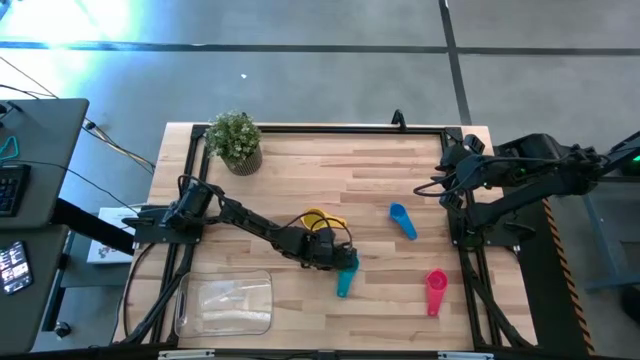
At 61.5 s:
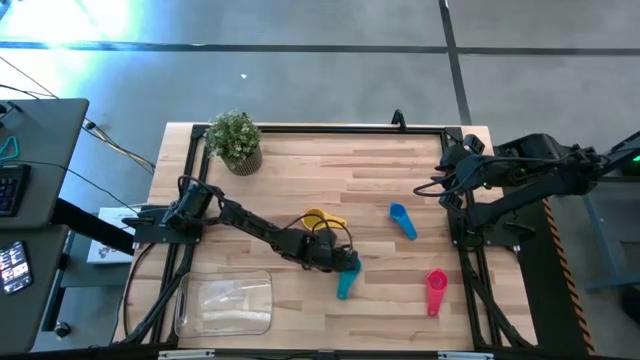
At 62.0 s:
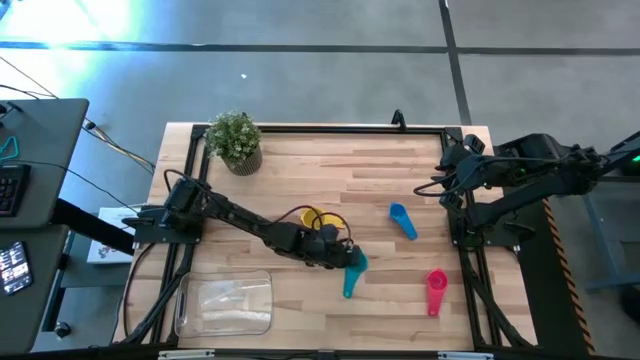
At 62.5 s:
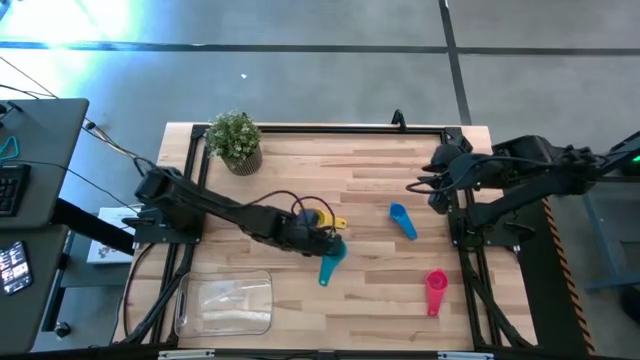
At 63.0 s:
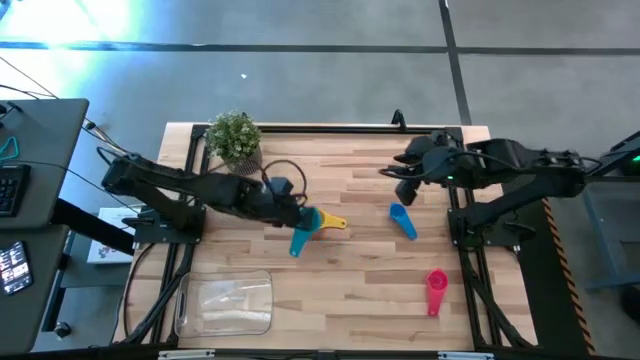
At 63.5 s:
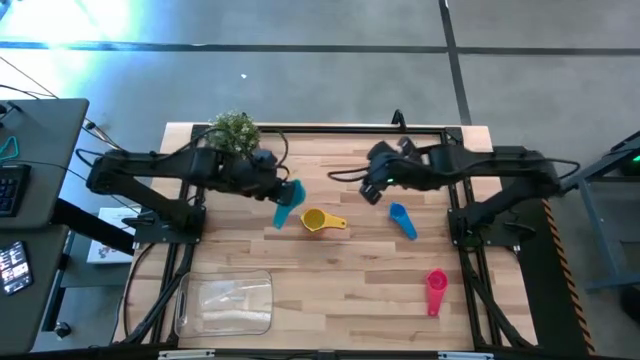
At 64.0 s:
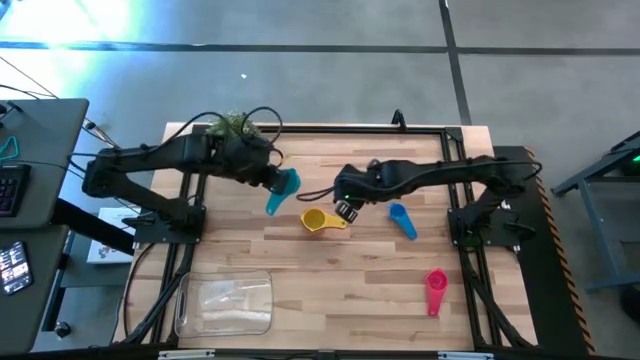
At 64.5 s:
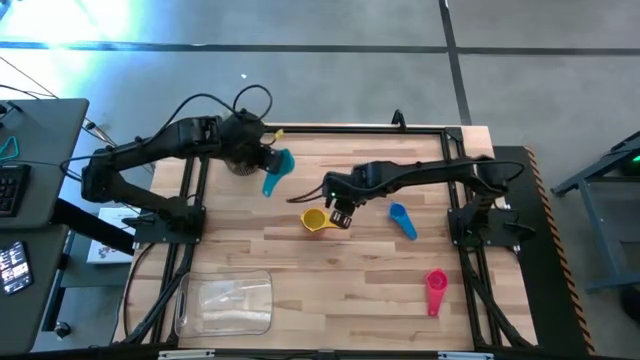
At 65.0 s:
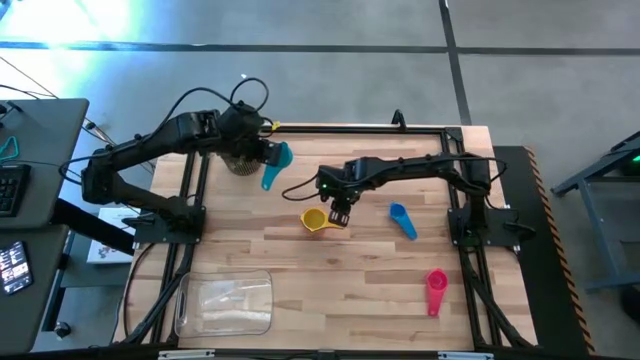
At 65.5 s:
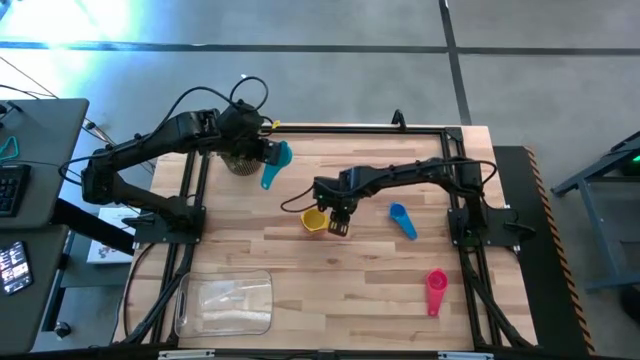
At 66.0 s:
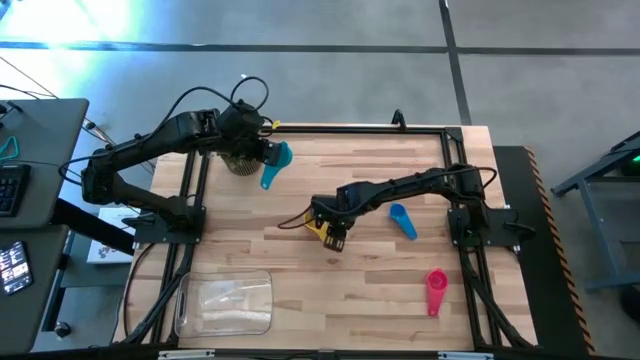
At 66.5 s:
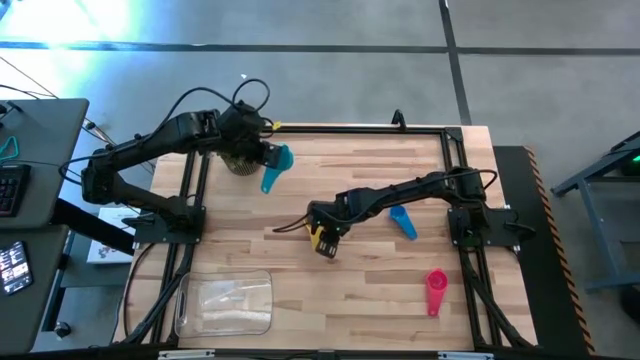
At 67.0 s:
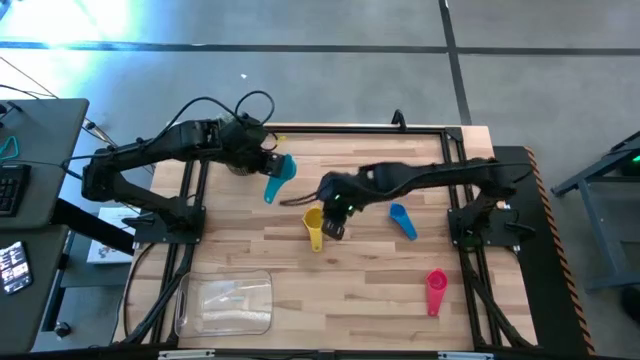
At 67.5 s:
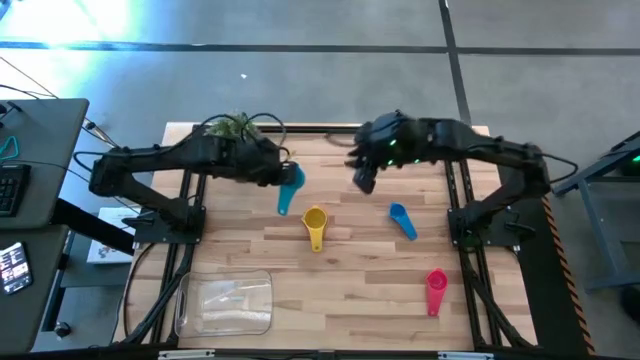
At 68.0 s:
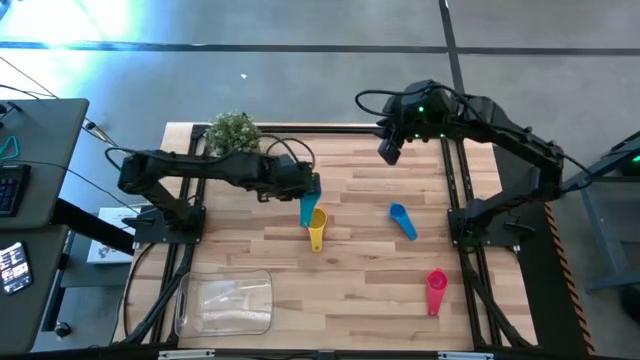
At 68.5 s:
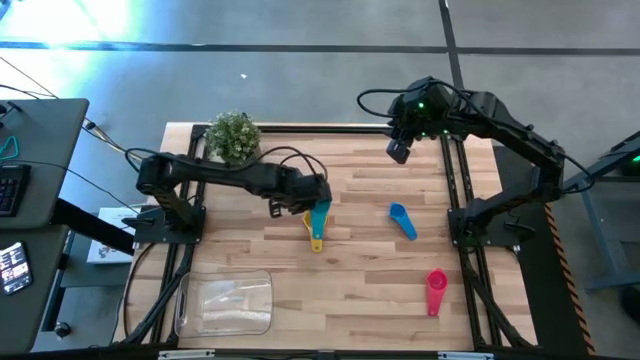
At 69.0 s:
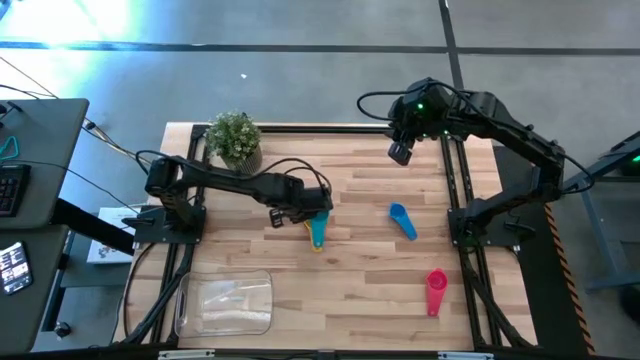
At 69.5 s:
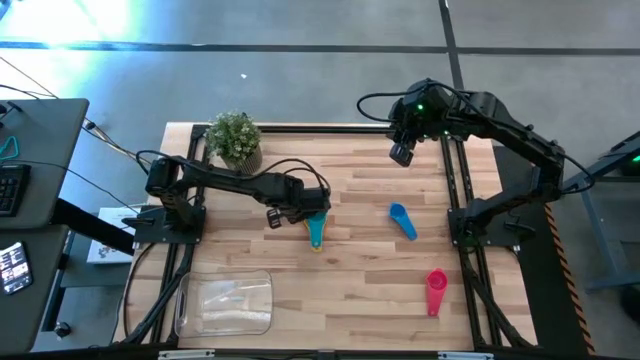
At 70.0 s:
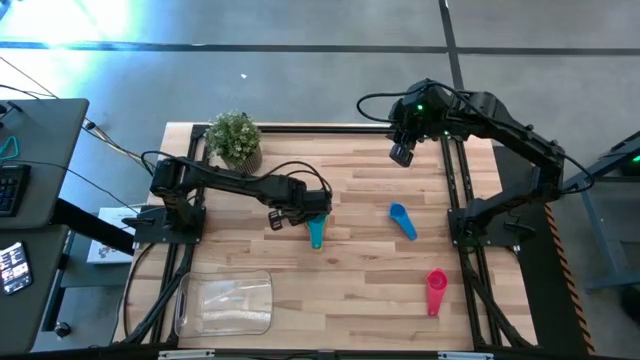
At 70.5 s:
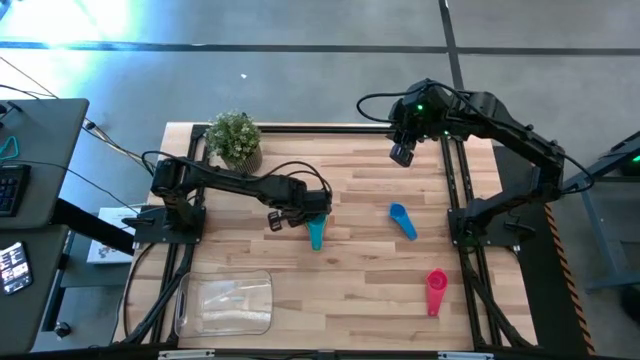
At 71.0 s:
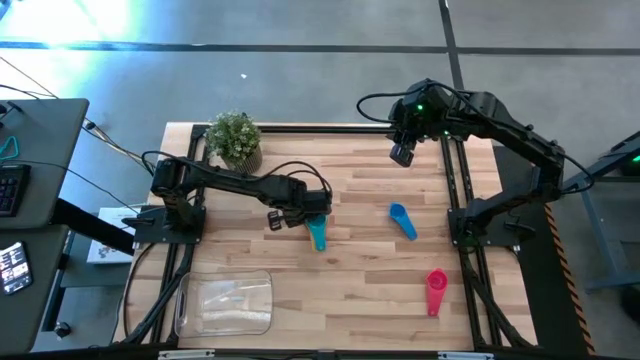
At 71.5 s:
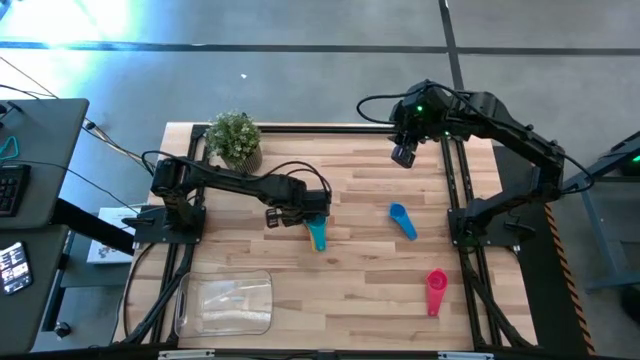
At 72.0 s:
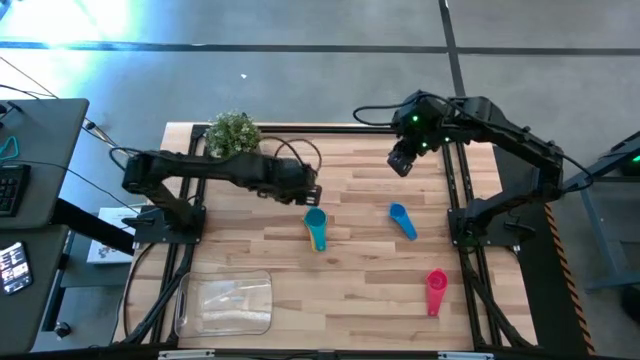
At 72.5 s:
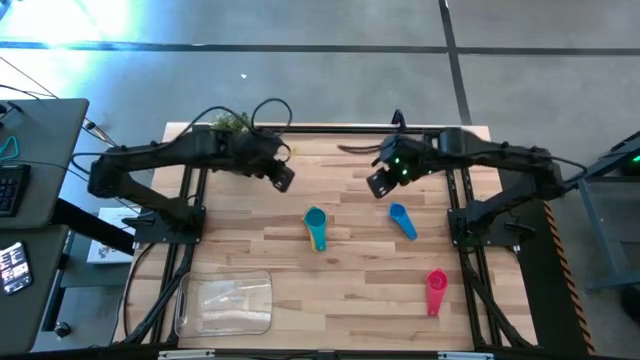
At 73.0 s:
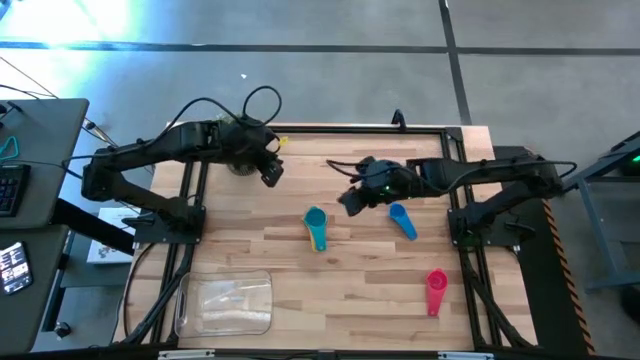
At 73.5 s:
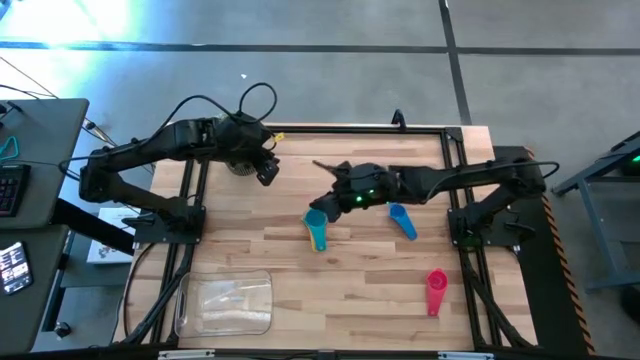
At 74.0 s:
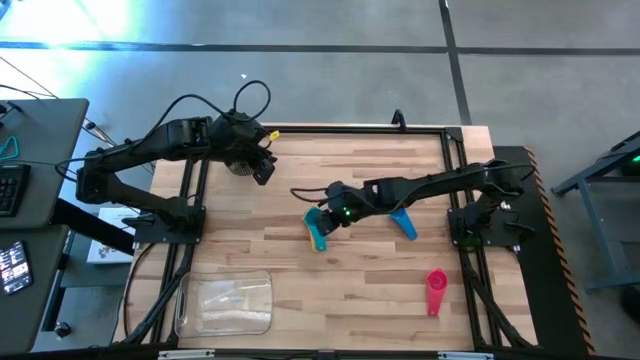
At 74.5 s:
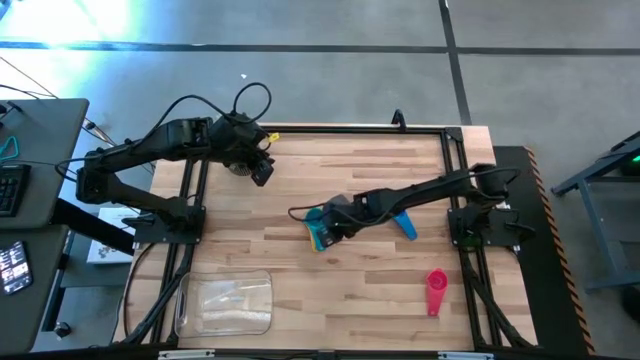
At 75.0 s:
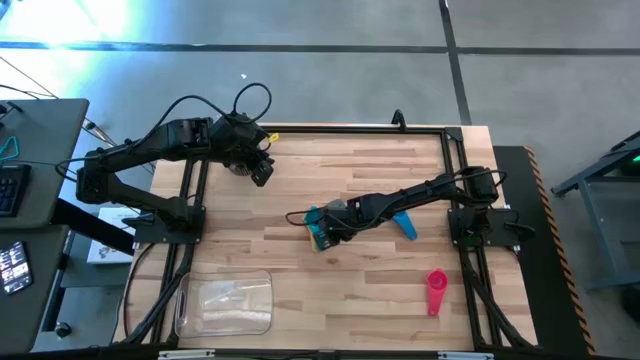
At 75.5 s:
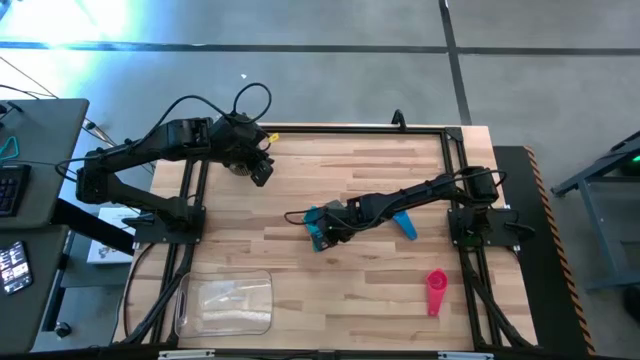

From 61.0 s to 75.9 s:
Task: Nest measuring cups in basket
Stack the light blue measuring cup on the yellow measuring cup

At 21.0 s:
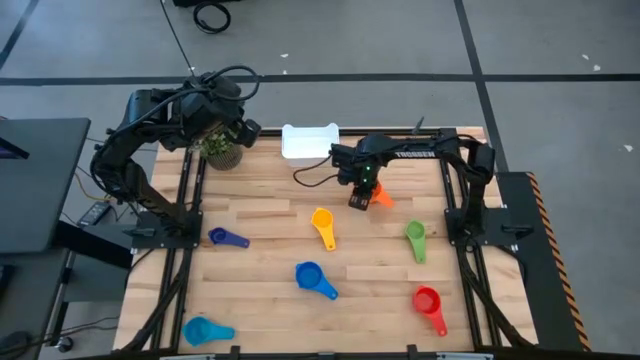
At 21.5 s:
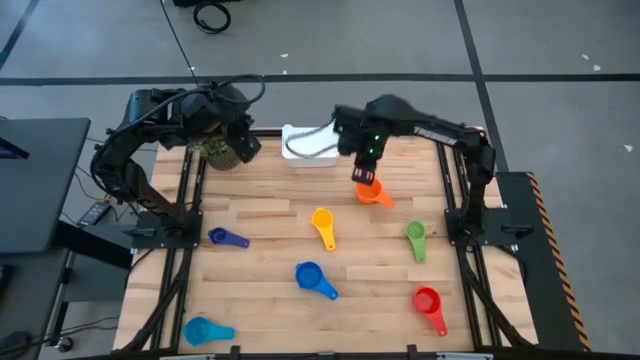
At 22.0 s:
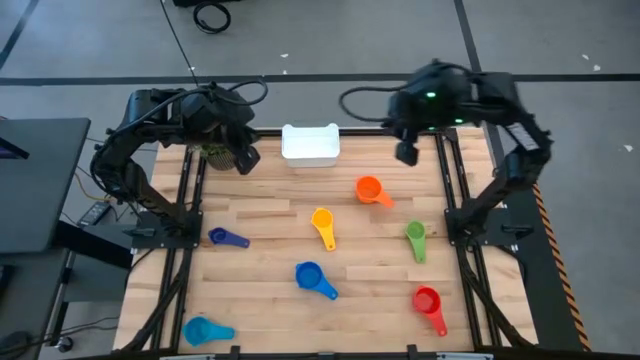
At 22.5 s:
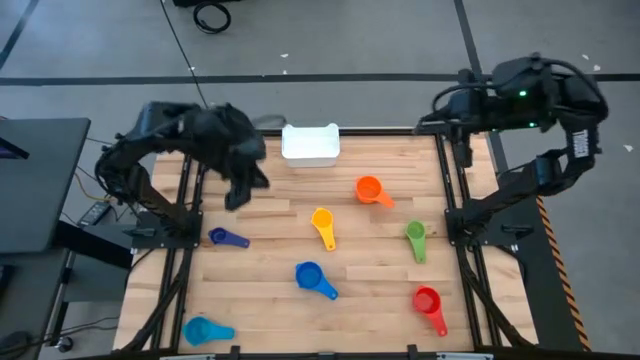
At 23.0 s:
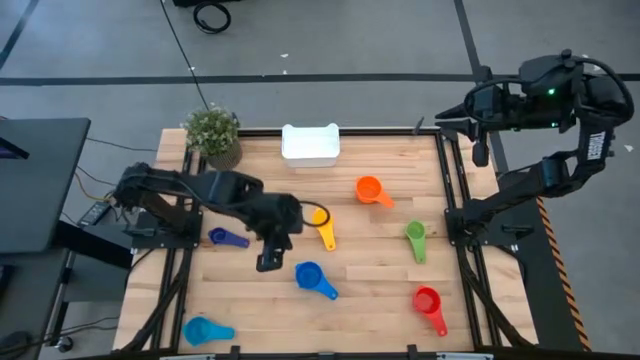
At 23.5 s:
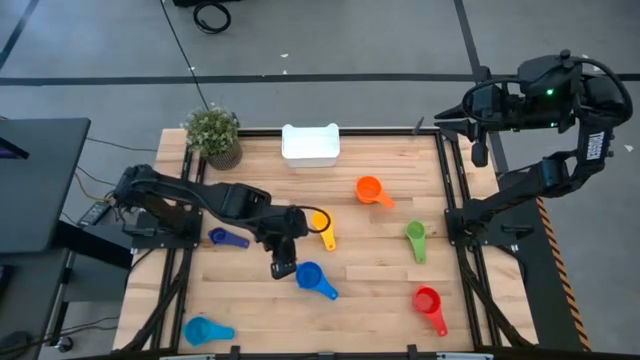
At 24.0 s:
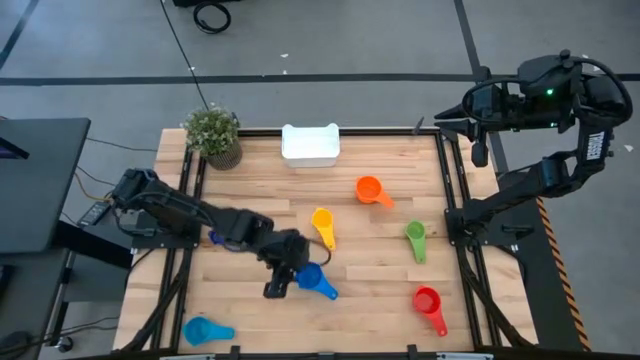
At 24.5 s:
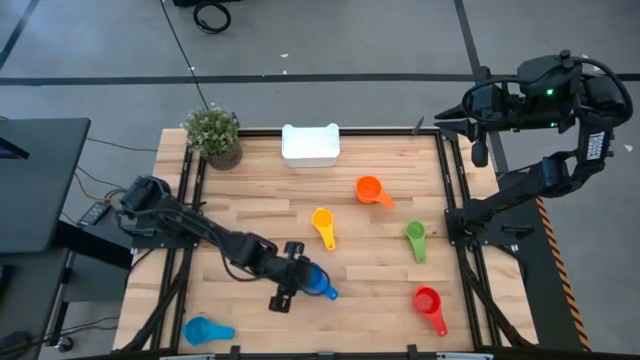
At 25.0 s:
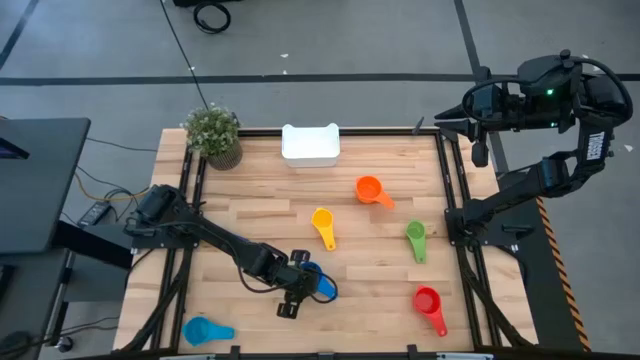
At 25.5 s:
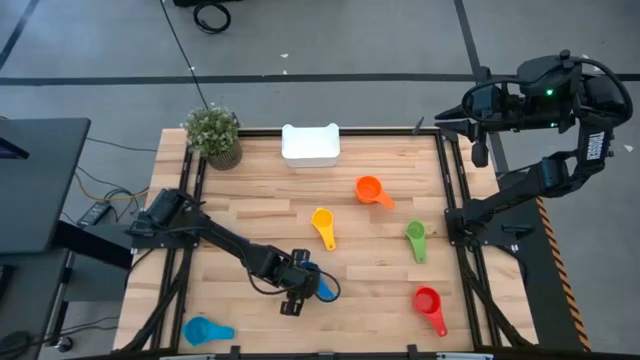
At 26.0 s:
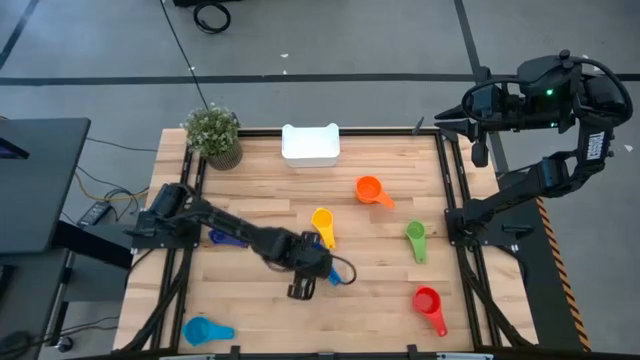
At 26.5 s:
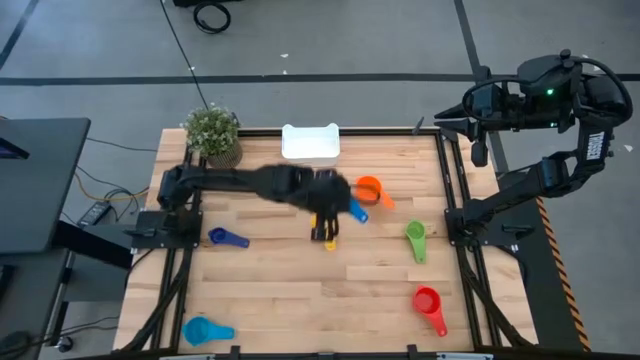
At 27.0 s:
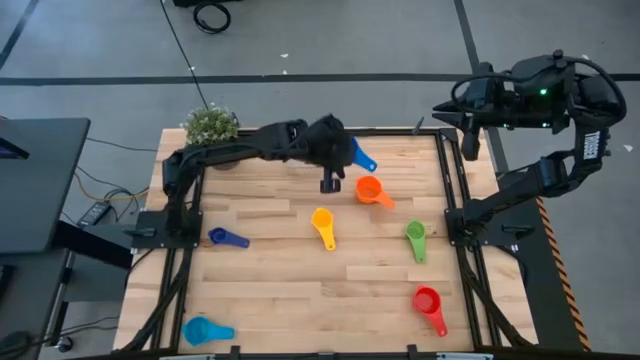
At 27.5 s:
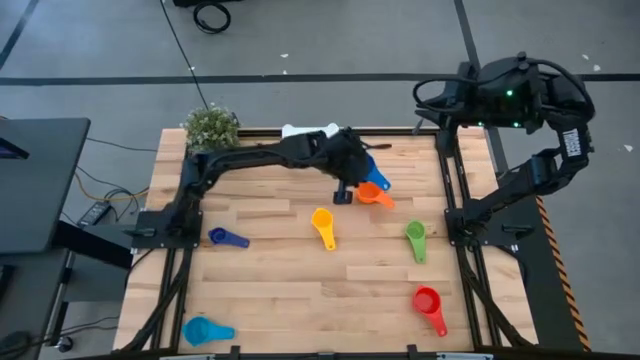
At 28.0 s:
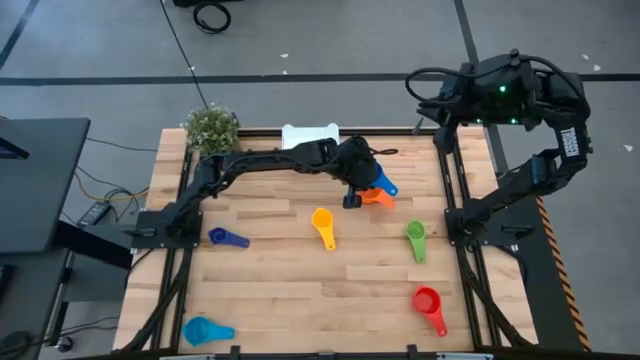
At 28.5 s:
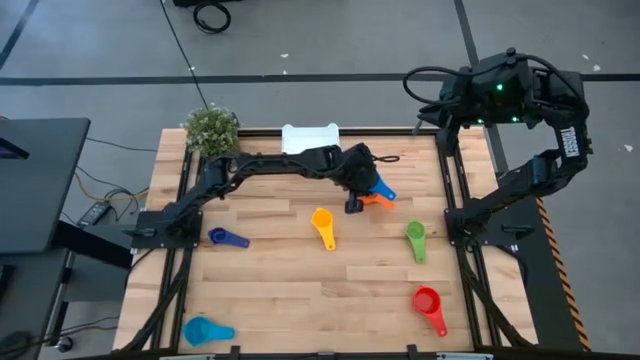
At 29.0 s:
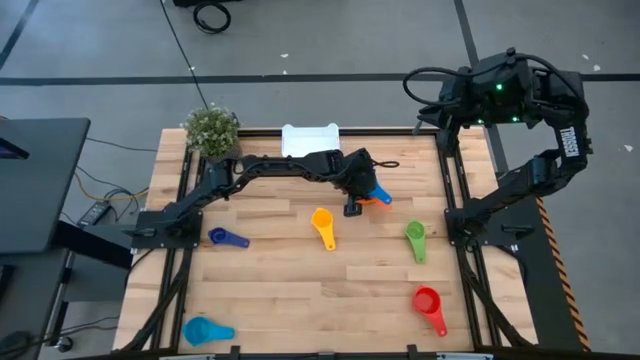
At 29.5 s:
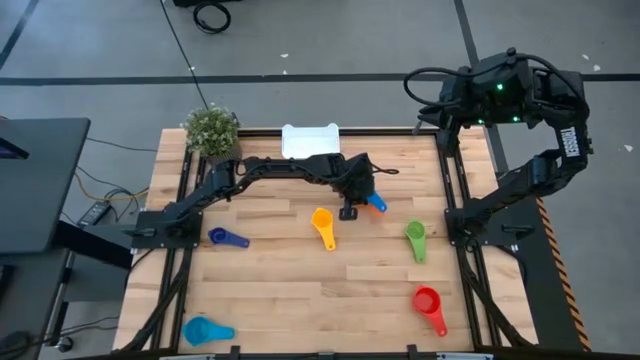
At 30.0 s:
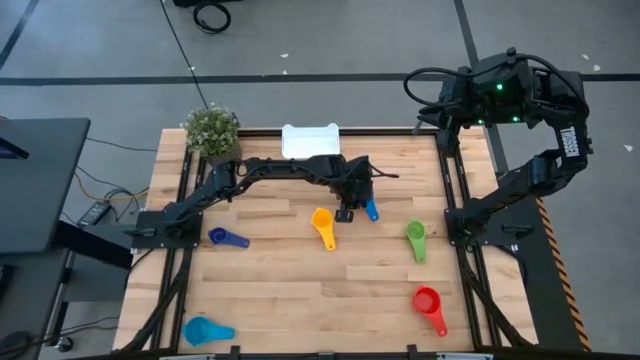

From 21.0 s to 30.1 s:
Task: Nest measuring cups in basket
Stack the blue measuring cup on top of the orange measuring cup
